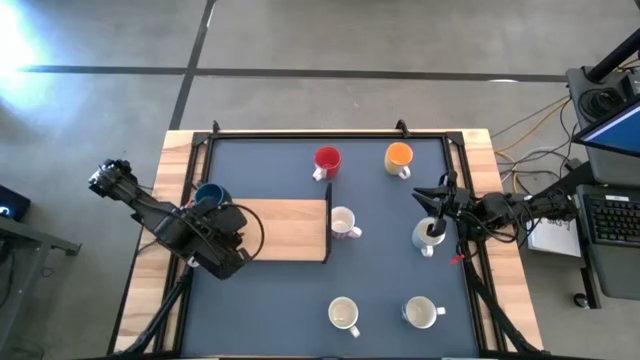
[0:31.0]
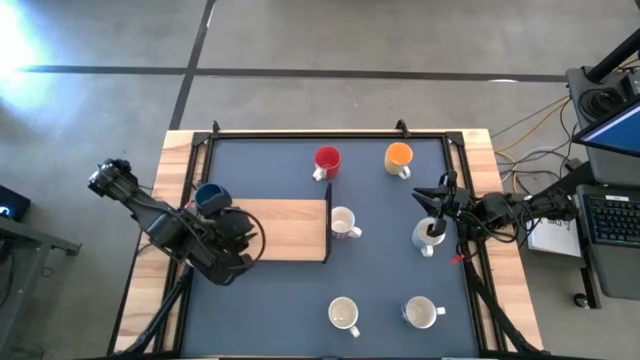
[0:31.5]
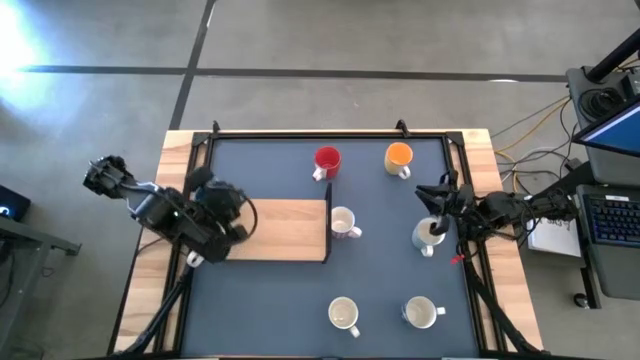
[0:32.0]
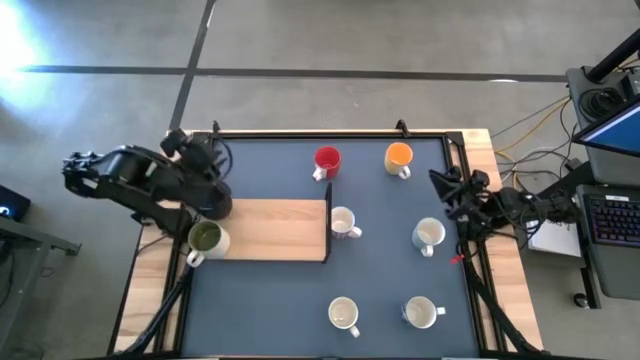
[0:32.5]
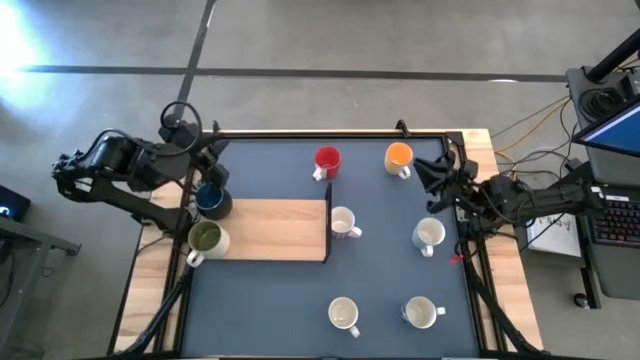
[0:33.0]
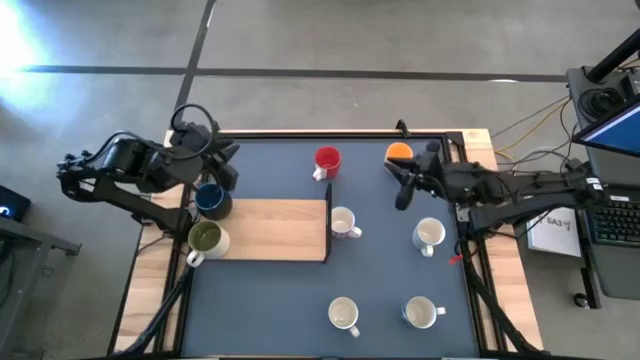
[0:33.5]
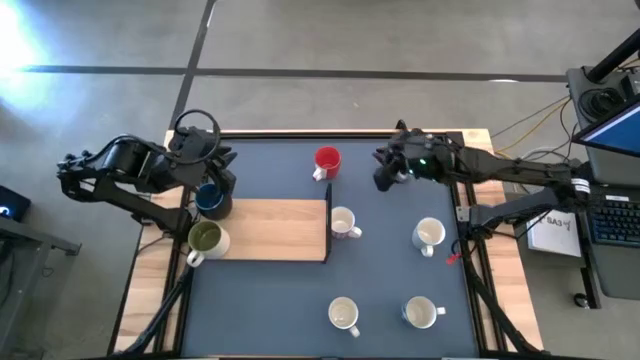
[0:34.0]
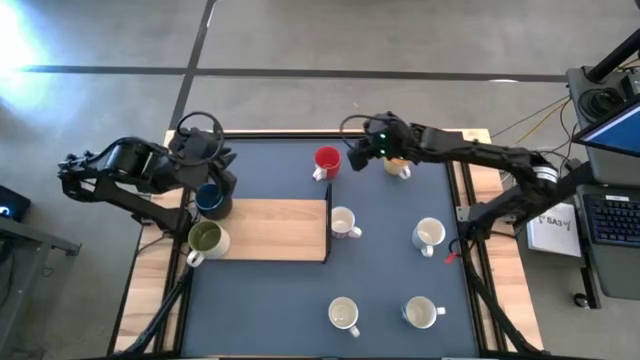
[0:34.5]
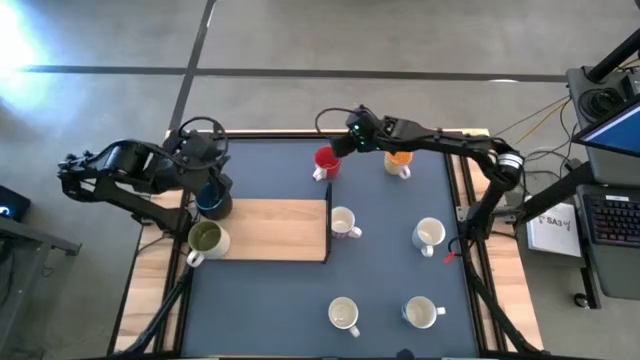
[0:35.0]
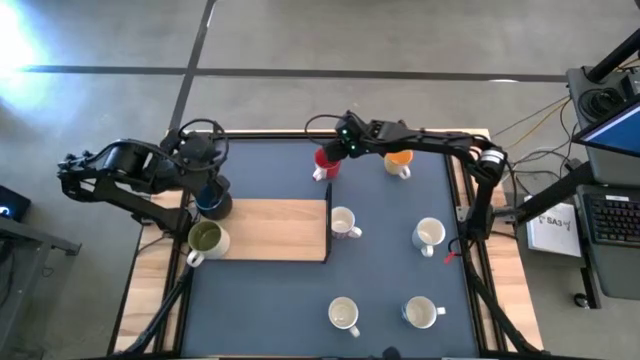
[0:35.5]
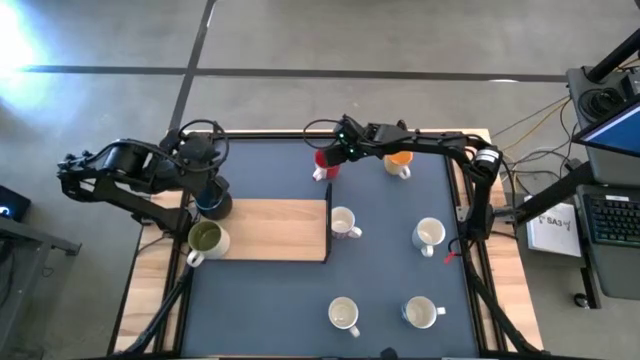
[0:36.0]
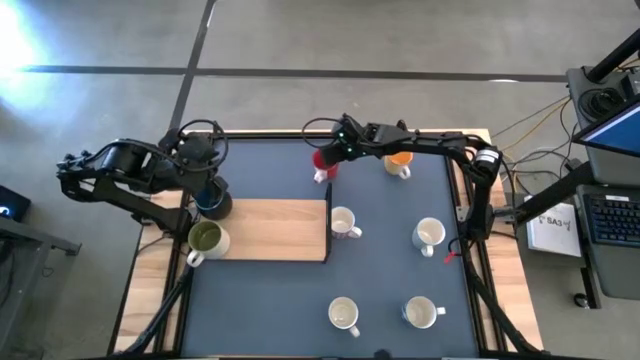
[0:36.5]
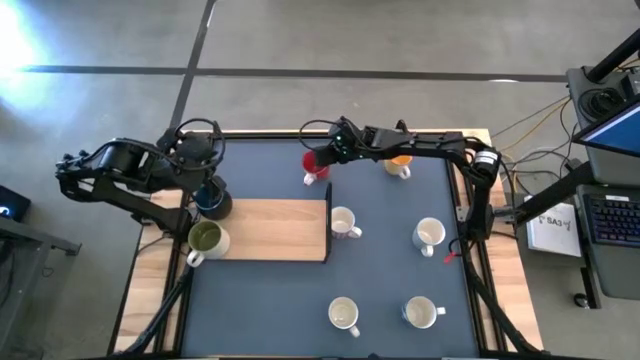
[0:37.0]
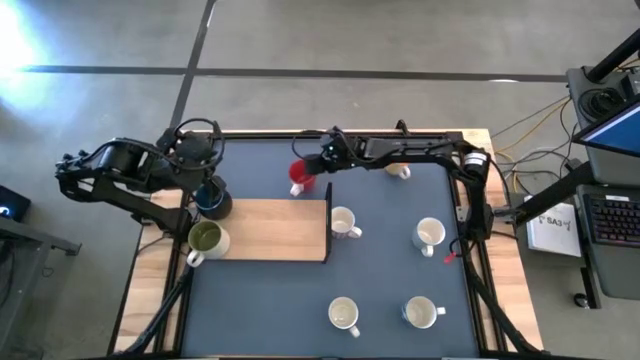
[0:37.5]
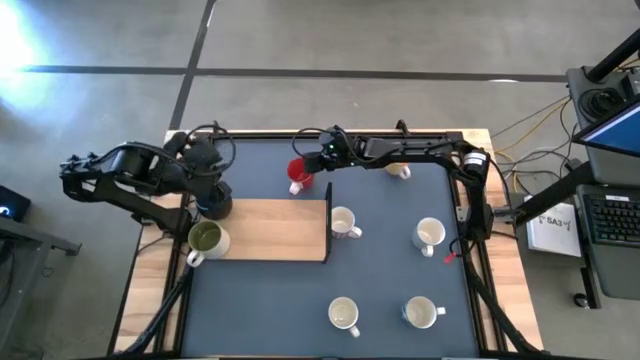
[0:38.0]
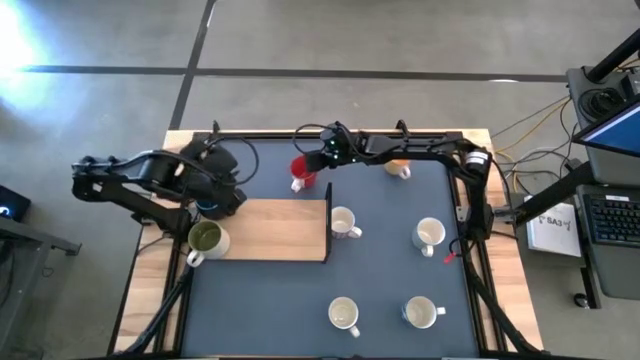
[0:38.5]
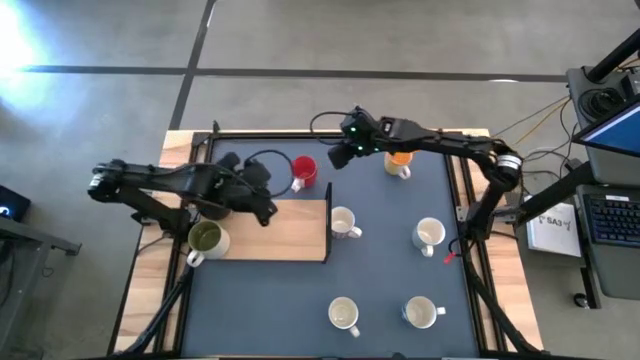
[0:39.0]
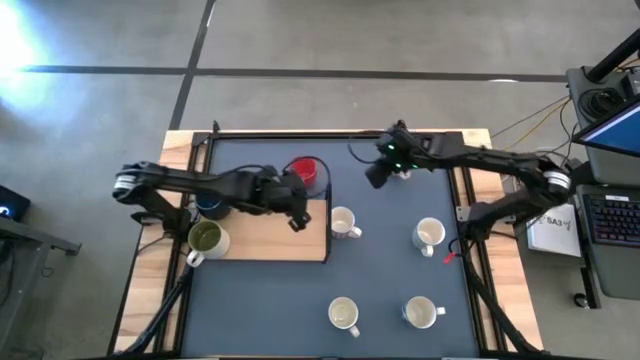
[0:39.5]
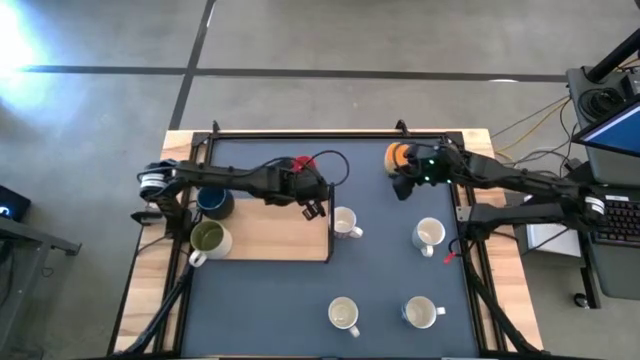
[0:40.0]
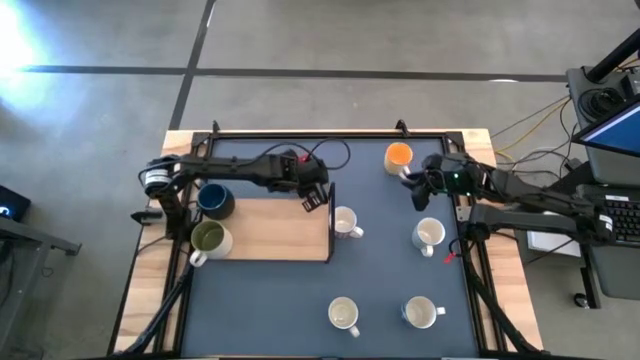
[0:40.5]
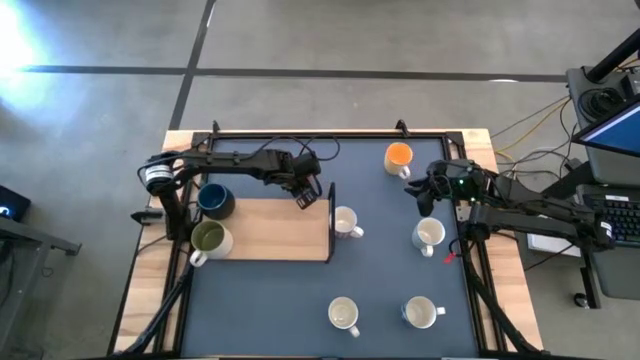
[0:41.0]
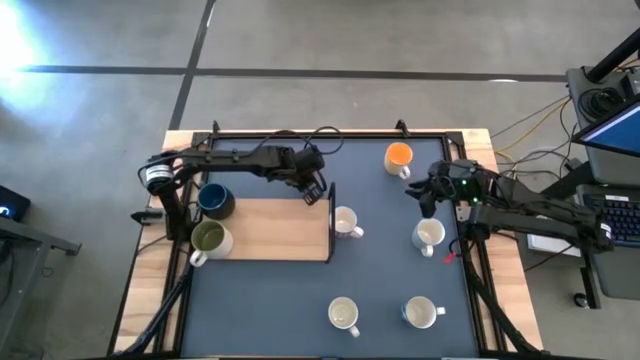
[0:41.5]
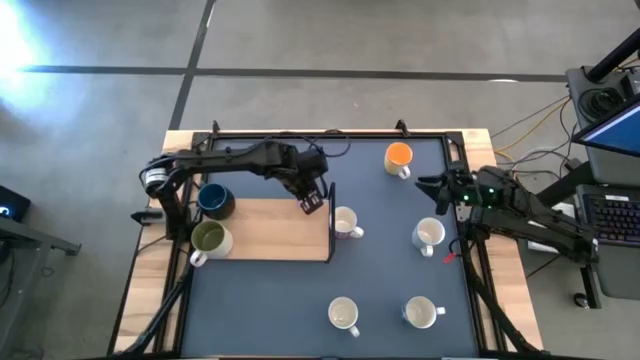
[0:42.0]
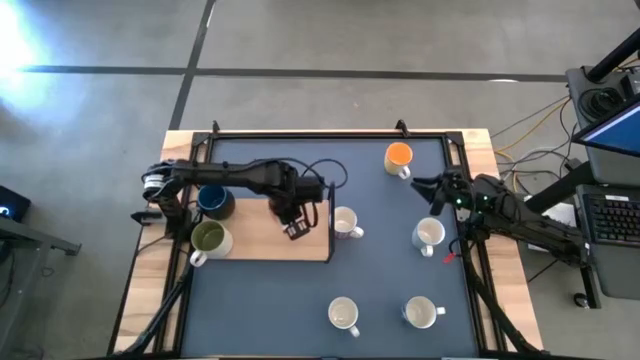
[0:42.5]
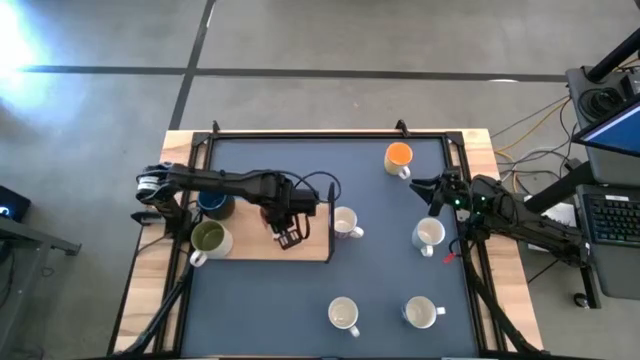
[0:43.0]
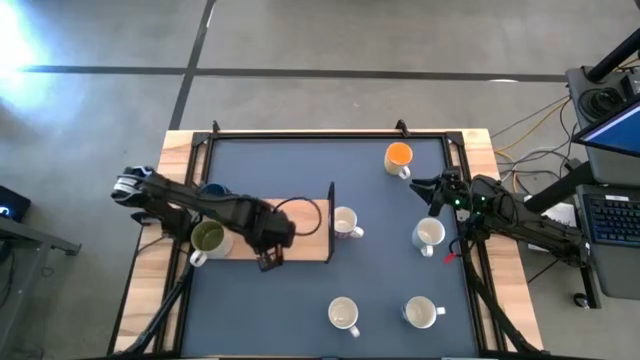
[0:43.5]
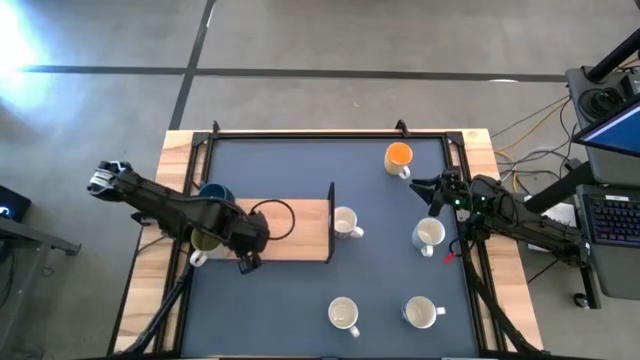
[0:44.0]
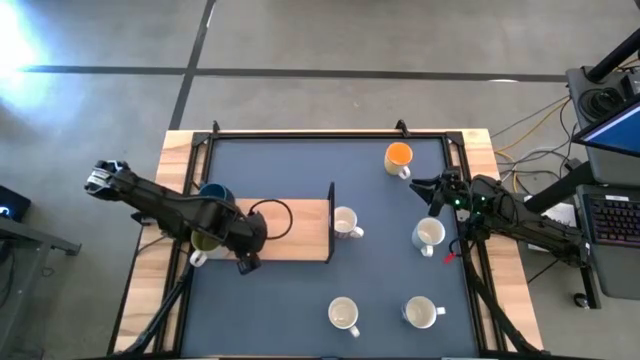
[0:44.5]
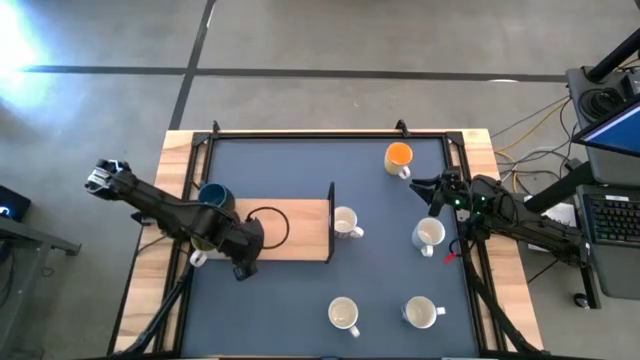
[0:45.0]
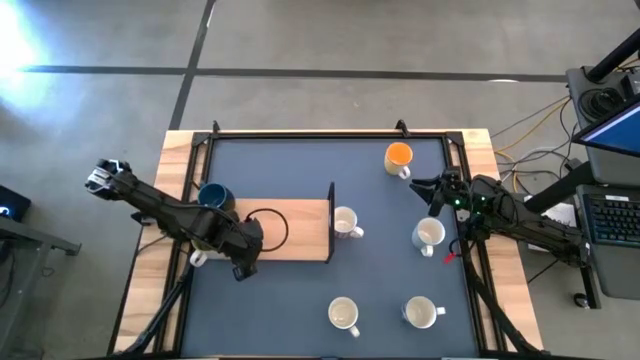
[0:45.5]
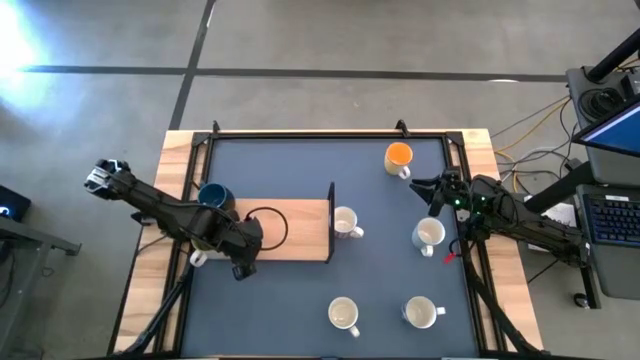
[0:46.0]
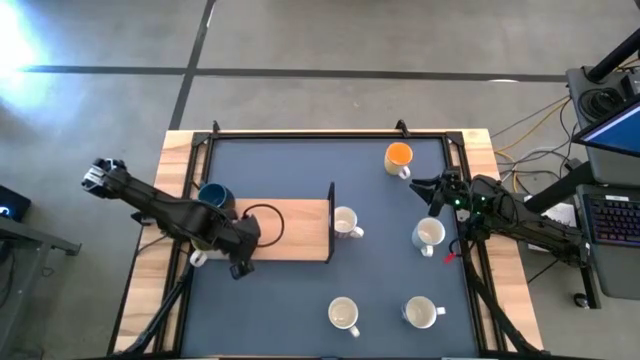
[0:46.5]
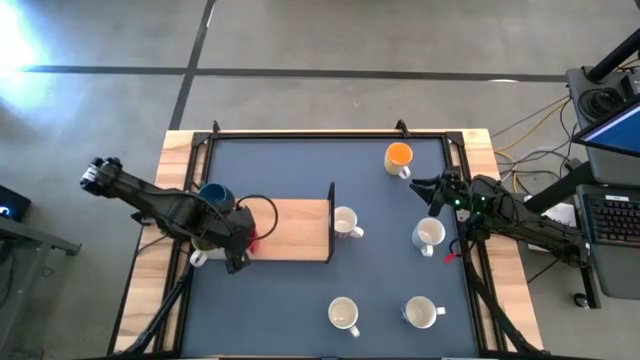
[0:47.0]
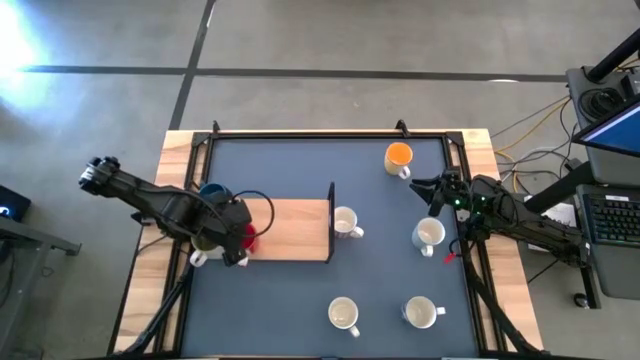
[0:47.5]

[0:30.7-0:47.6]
Task: Place coffee mugs
Put the red mug on the shelf

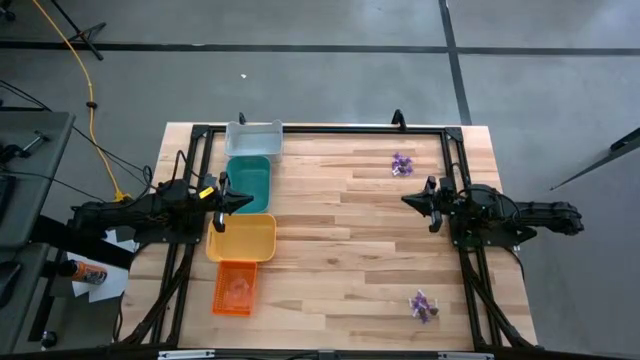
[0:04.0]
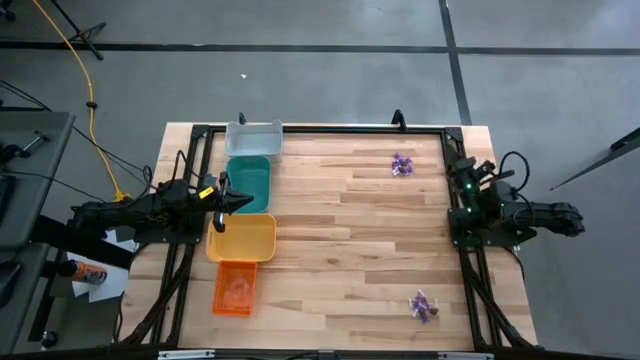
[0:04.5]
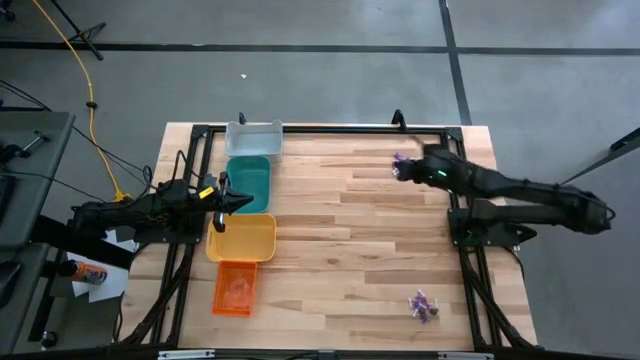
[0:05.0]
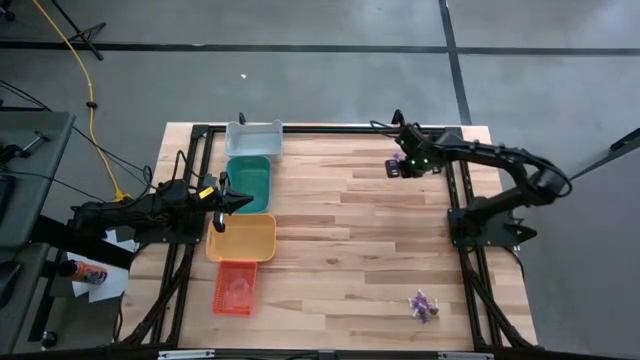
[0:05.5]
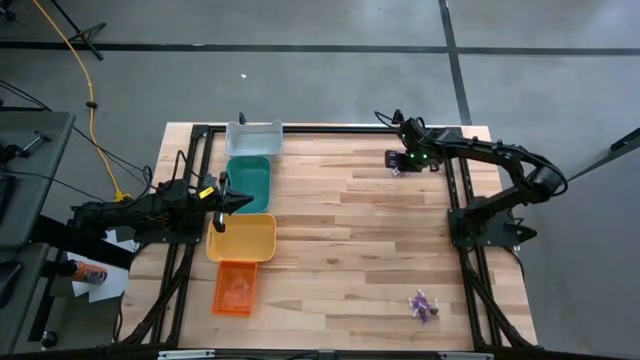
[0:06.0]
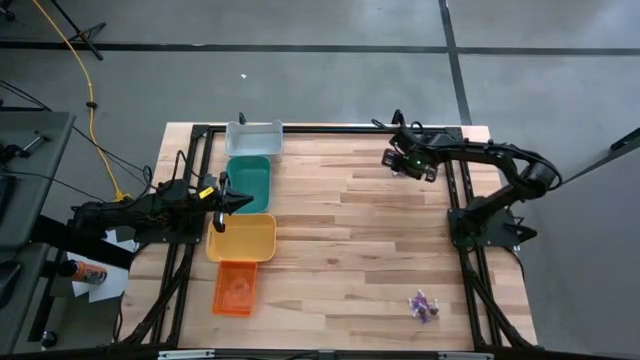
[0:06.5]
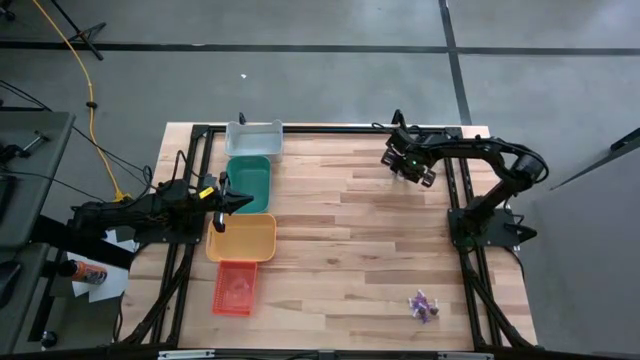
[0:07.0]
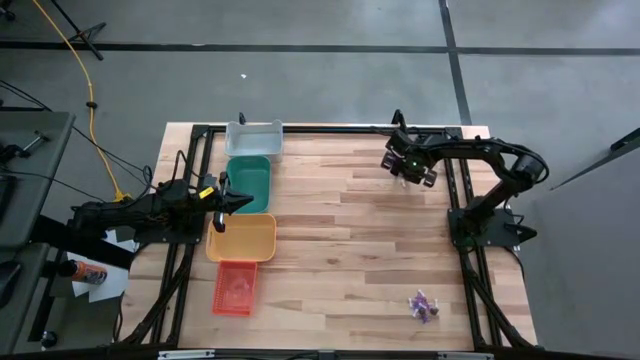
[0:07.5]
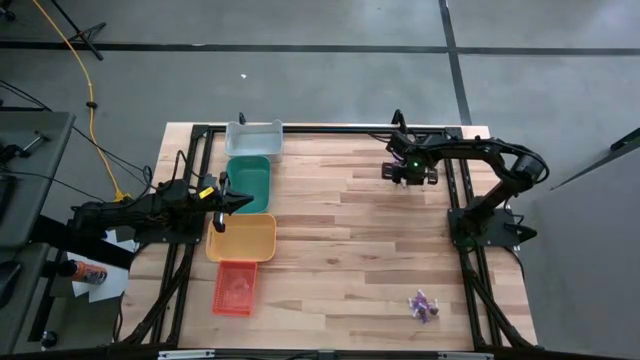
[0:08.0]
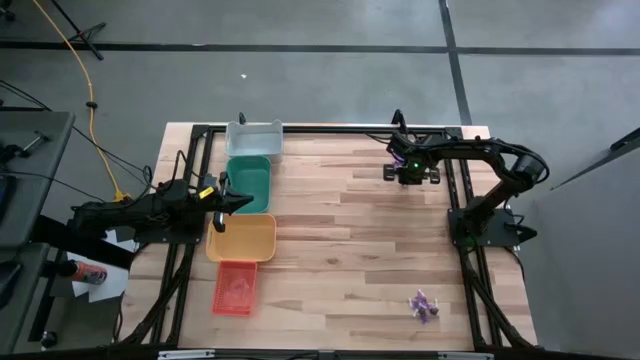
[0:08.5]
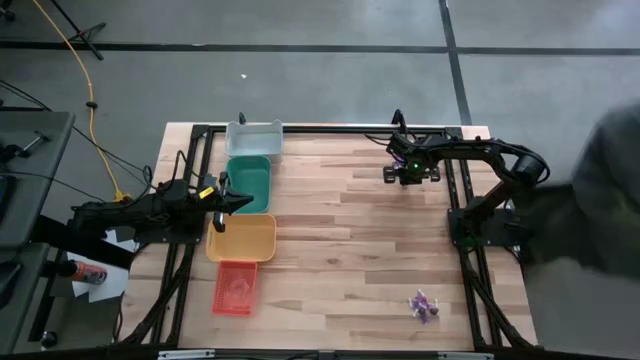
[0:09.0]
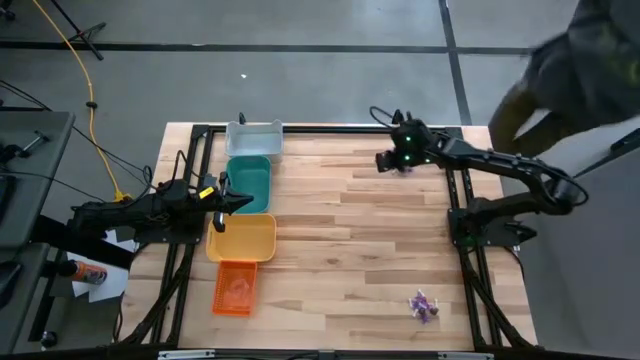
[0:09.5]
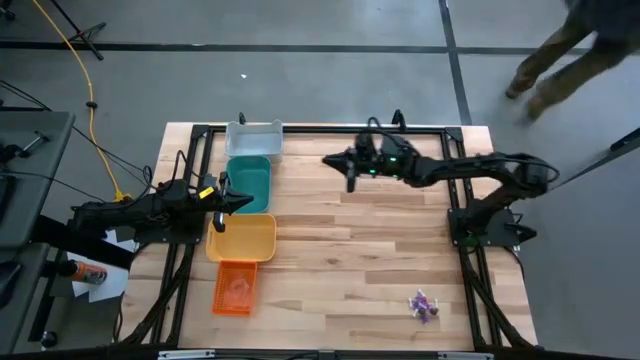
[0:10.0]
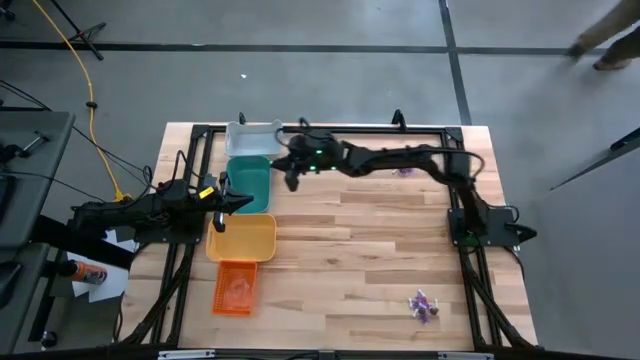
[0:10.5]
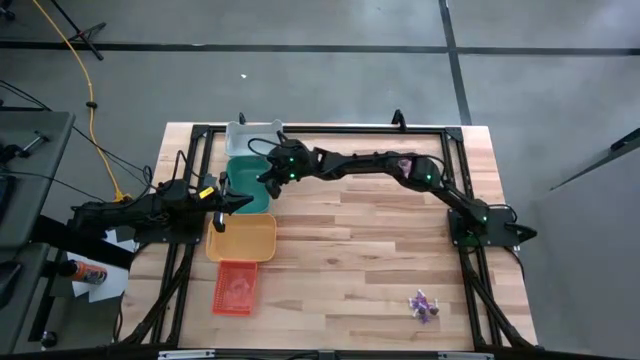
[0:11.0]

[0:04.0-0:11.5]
Task: Sort Halloween decoration
Put the white bone toy in the green bin
